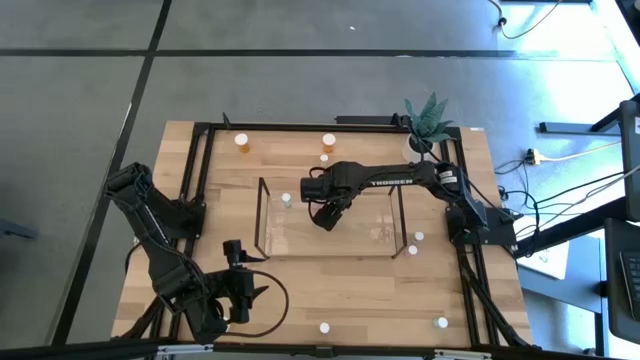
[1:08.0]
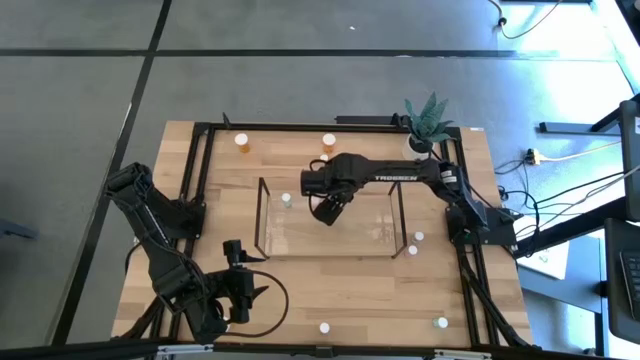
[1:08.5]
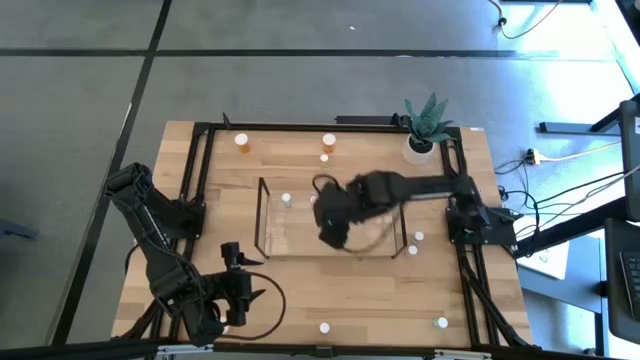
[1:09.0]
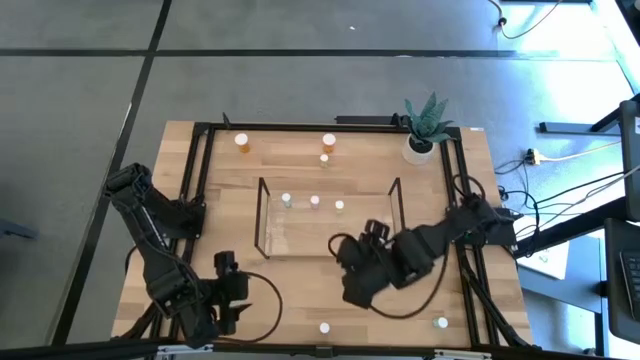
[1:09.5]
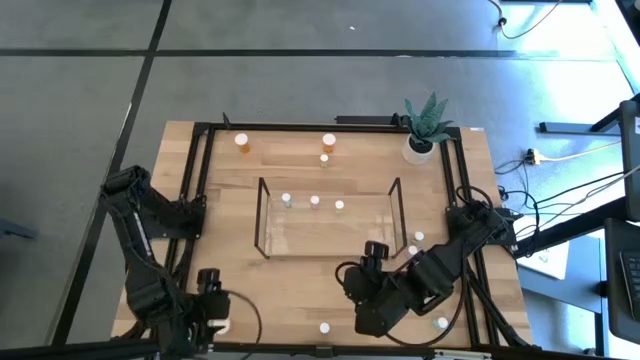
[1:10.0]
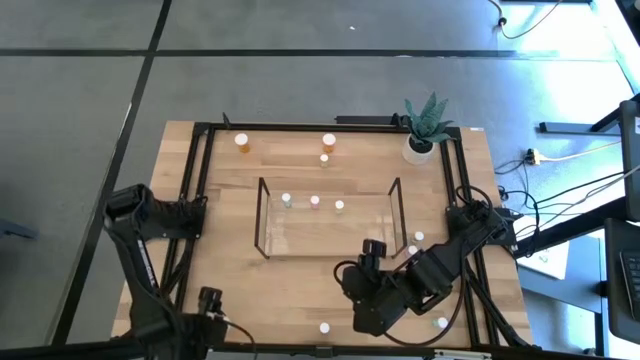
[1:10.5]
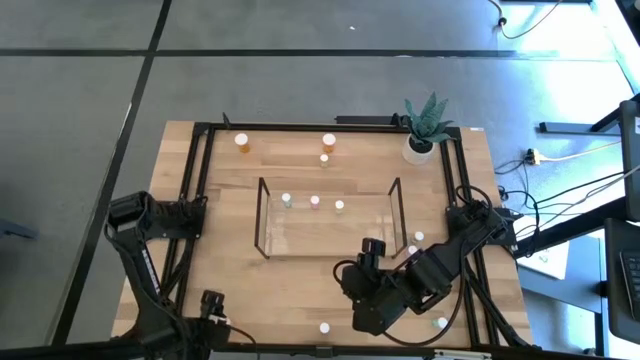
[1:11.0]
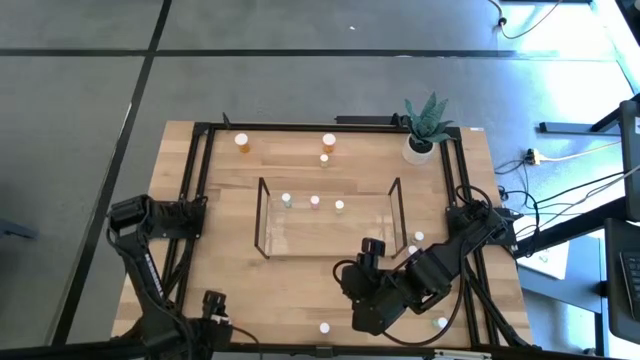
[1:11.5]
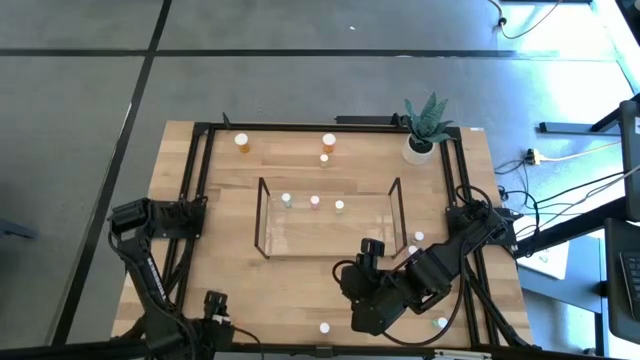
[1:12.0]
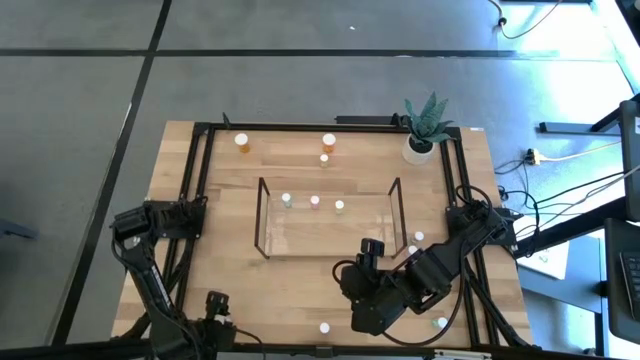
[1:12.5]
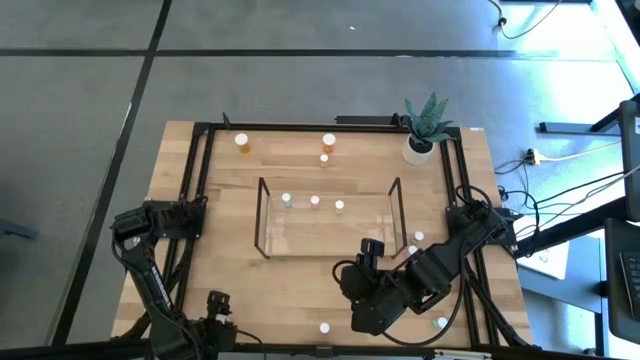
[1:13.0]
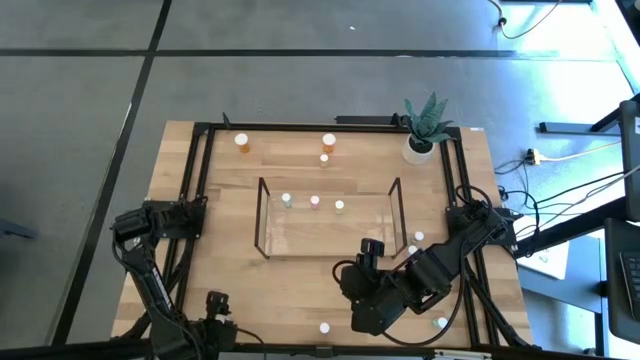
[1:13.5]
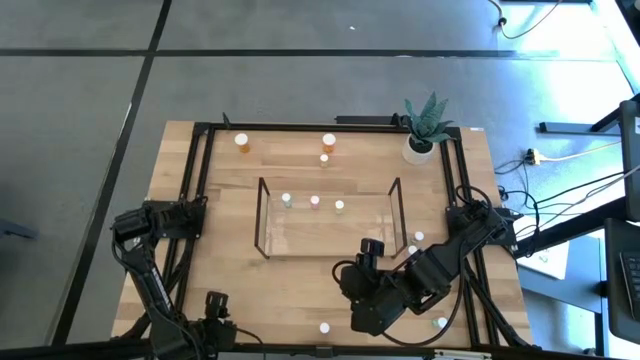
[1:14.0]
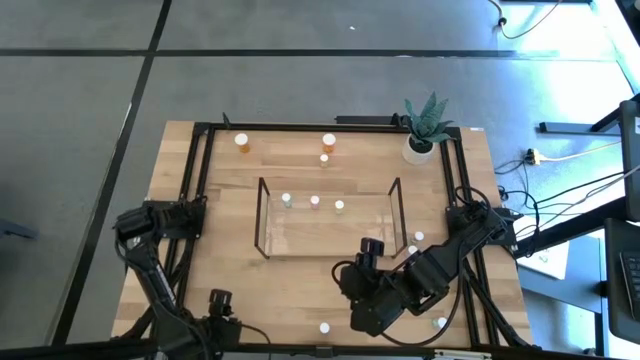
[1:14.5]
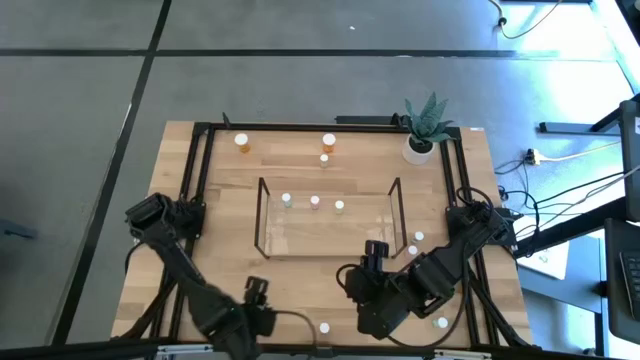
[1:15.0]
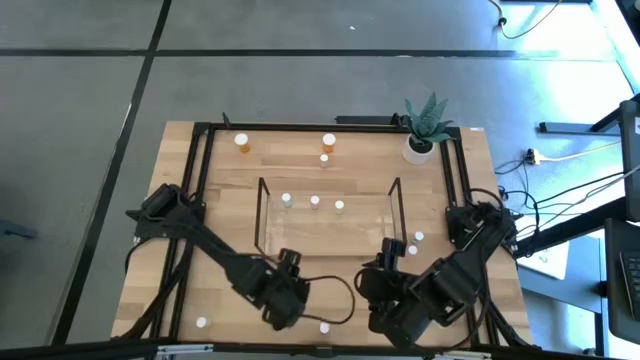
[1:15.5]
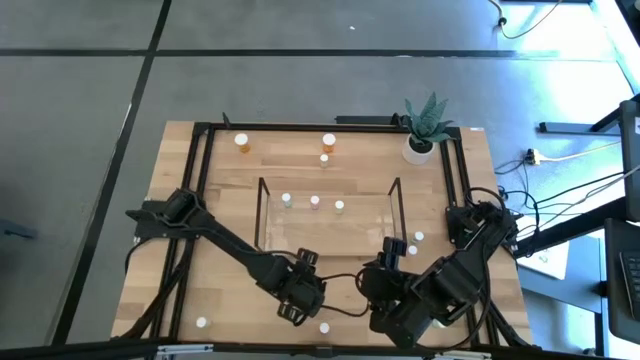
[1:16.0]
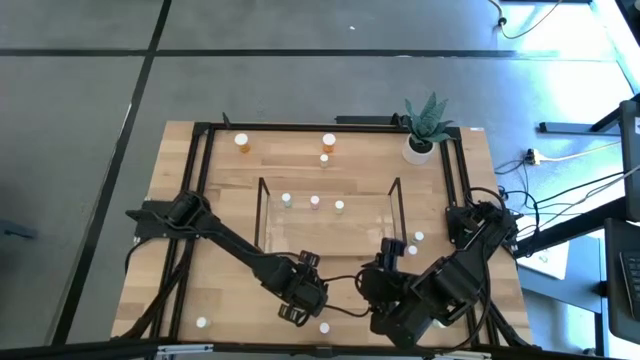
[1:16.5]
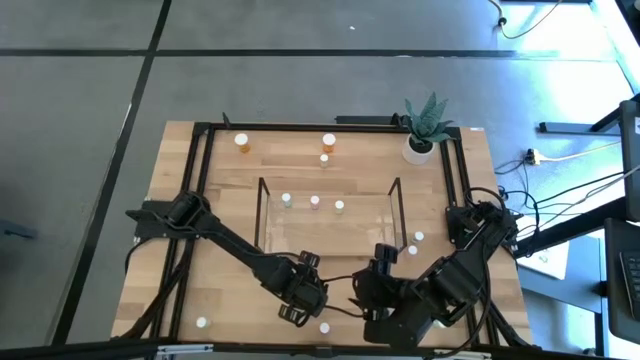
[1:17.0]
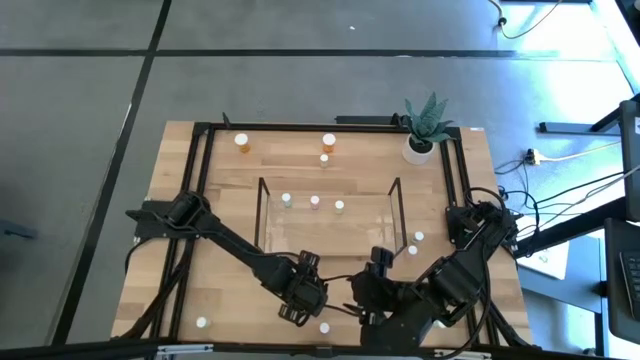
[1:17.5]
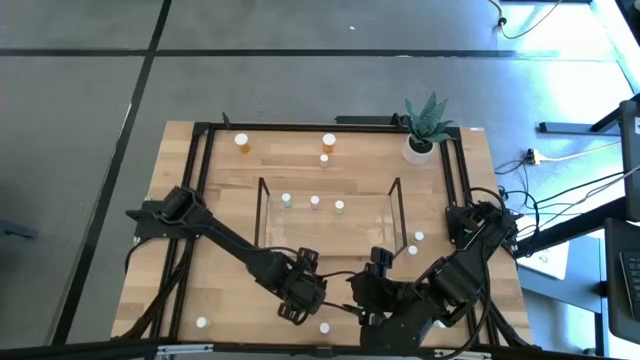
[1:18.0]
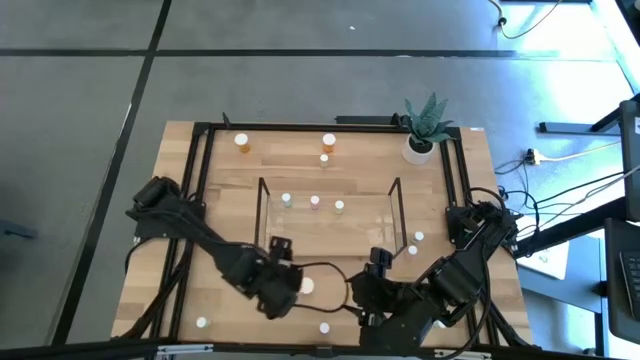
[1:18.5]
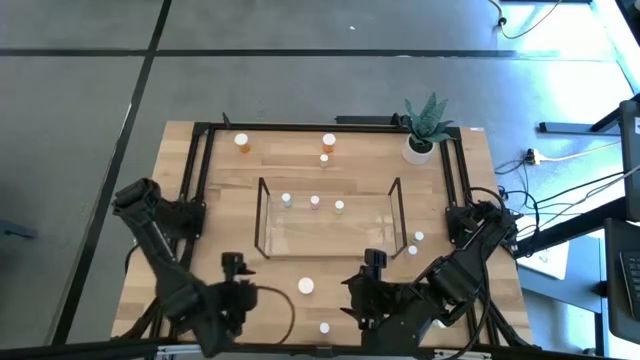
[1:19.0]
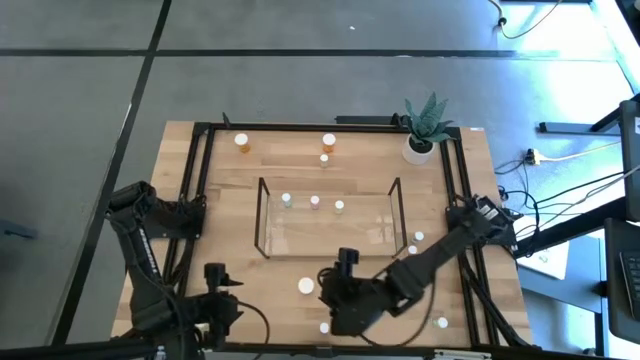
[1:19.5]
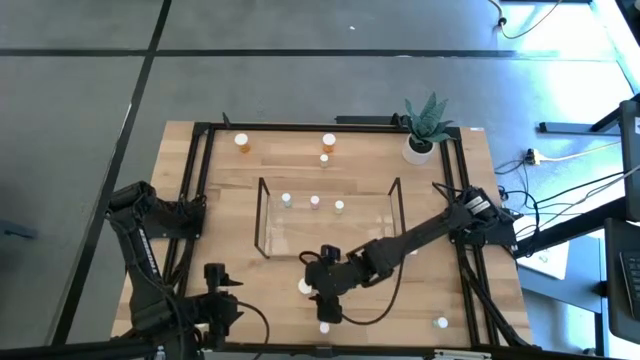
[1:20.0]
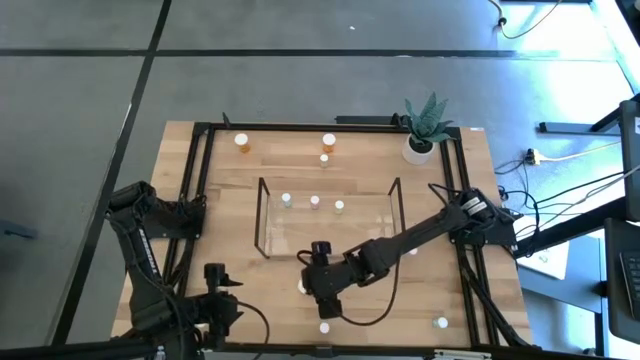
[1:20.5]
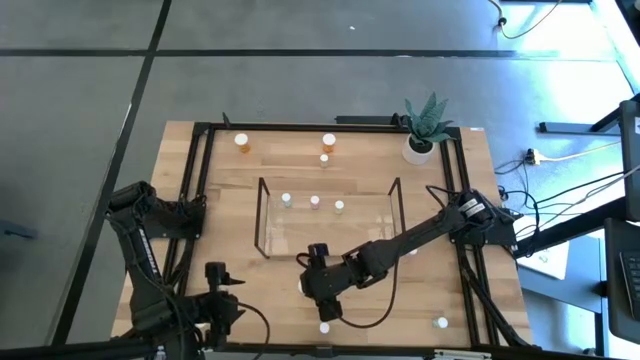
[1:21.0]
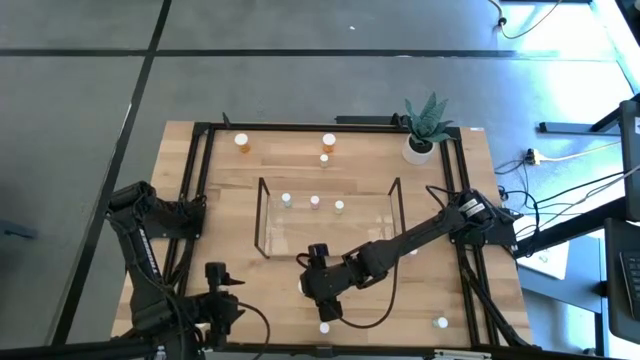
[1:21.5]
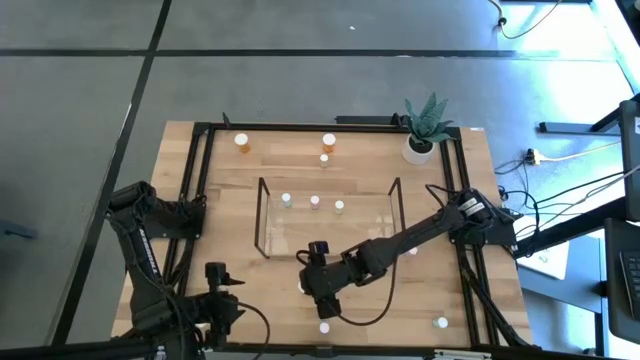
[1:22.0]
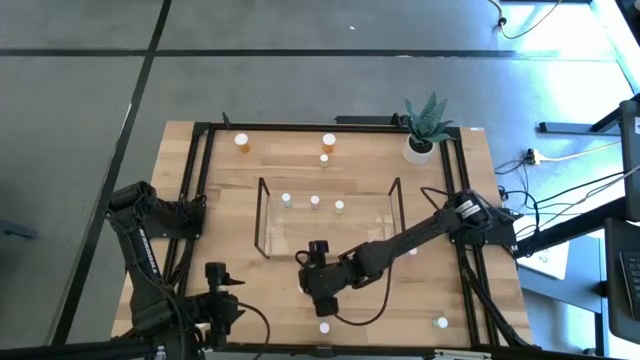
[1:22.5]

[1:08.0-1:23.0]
Task: Pick and place medicine bottles onto shelf by color
Put the bottom orange pill bottle on the shelf

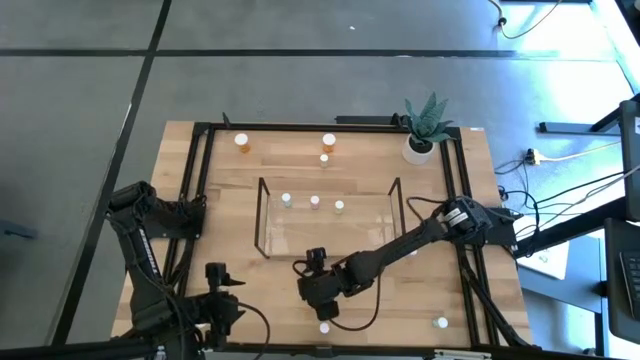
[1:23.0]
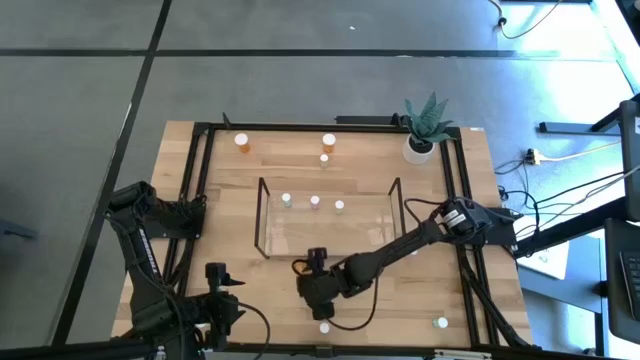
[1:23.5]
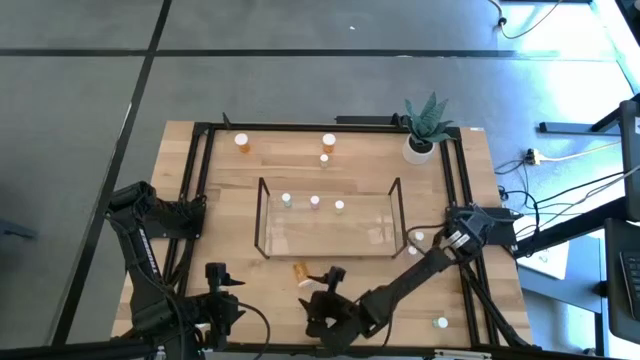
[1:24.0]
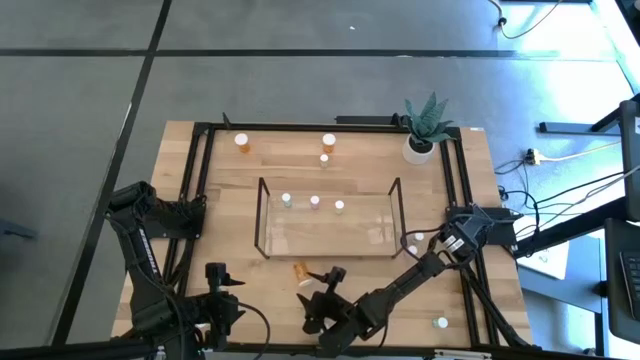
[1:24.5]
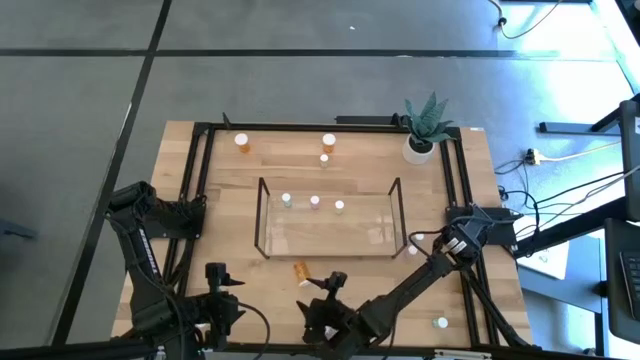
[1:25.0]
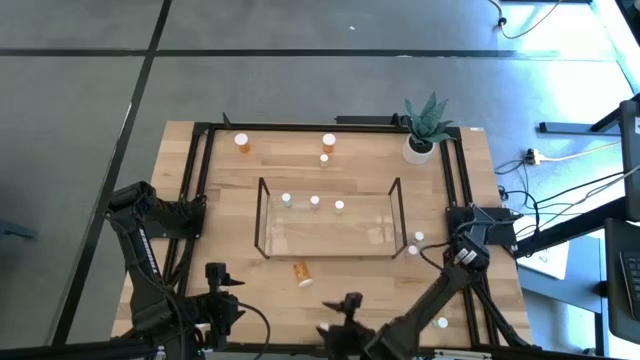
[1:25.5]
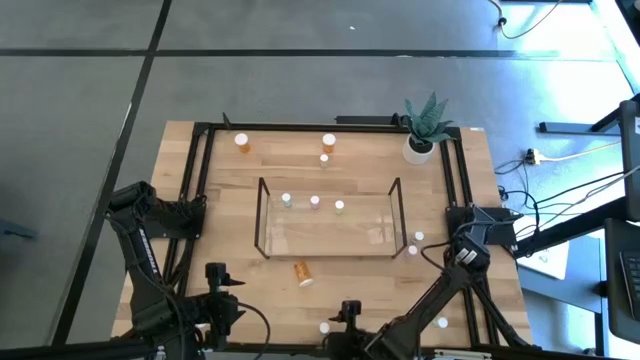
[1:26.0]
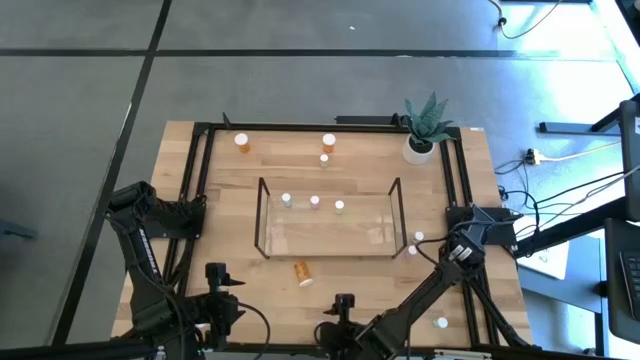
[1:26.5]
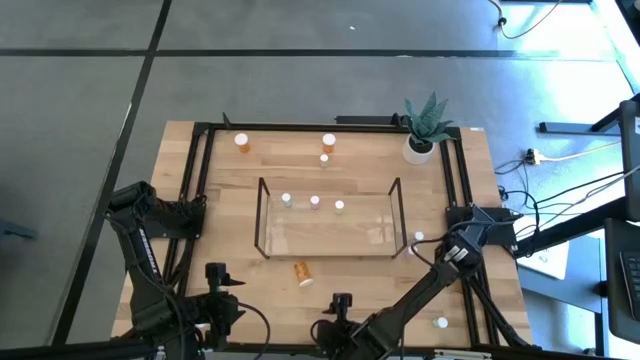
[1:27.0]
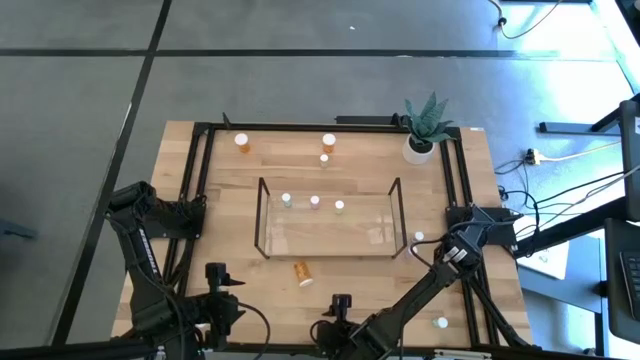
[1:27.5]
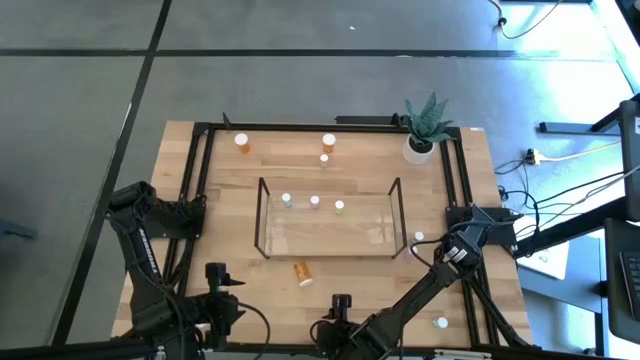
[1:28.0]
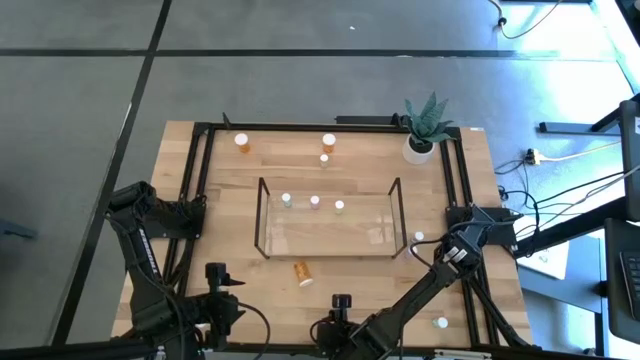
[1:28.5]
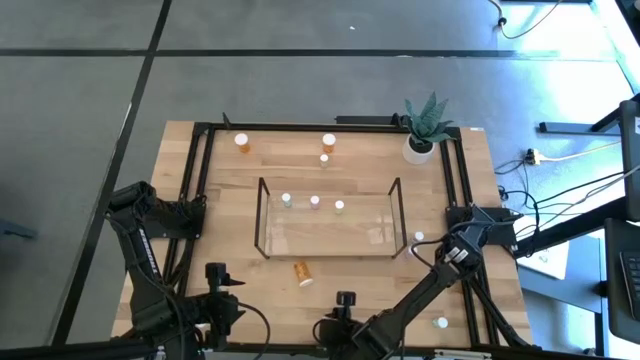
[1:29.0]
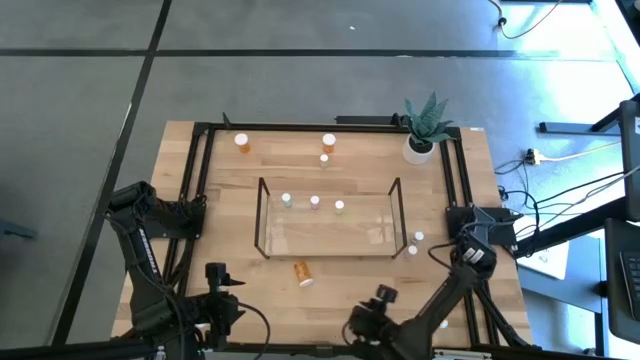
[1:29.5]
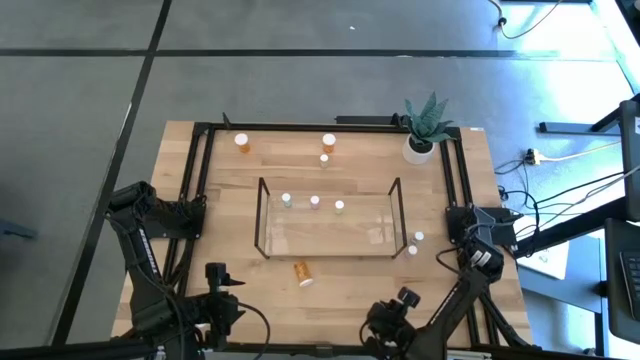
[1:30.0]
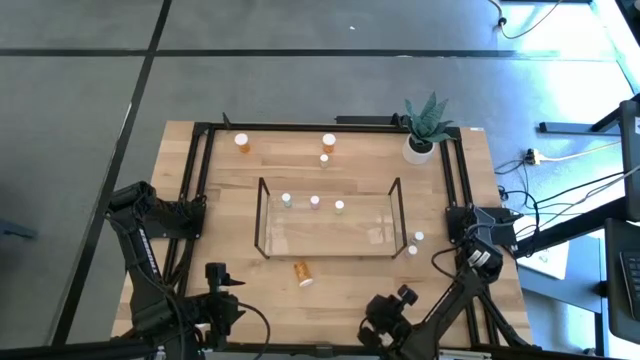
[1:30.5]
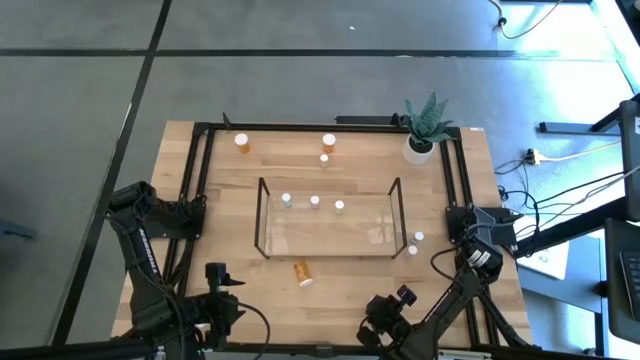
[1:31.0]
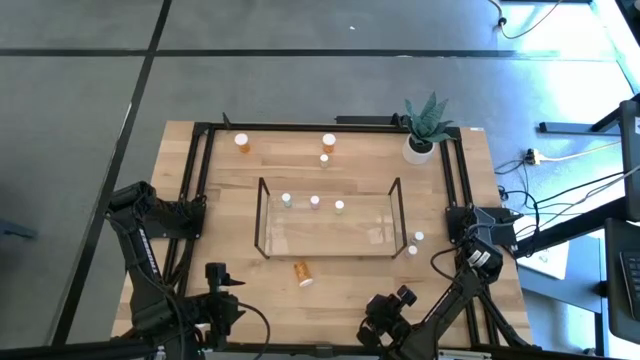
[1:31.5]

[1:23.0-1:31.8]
Move the pink pill bottle to the bottom right of the table
